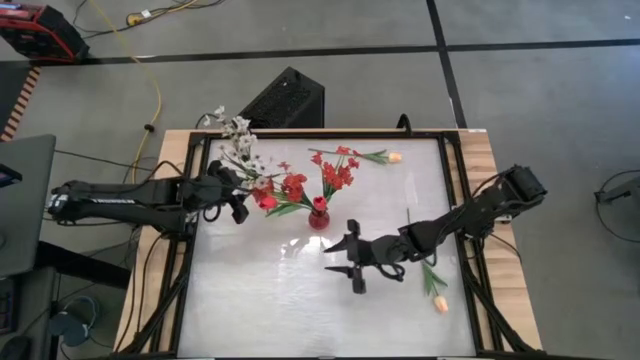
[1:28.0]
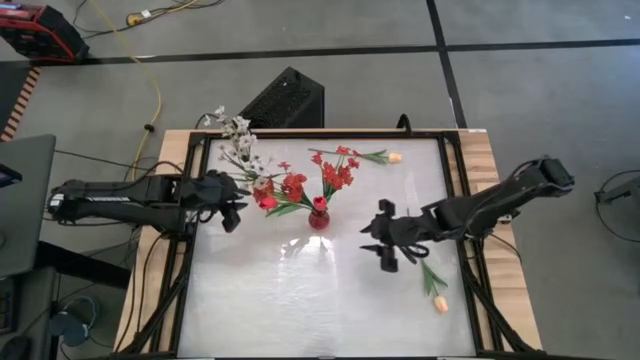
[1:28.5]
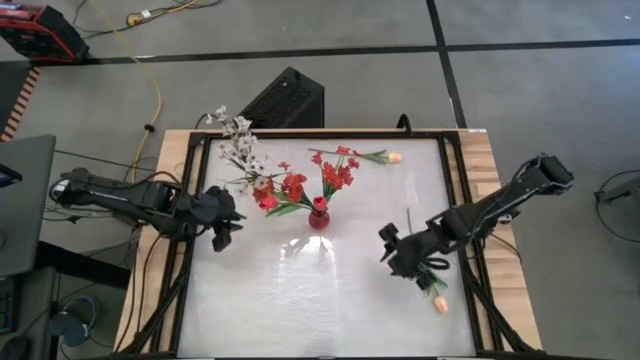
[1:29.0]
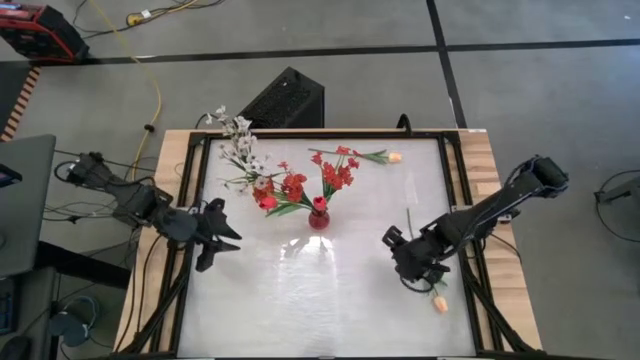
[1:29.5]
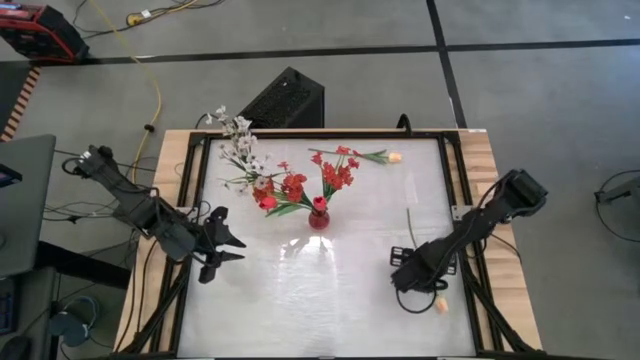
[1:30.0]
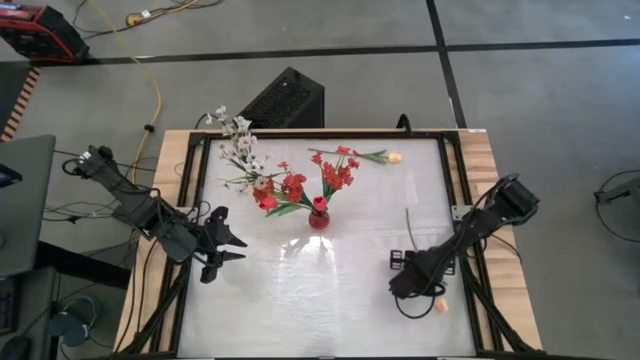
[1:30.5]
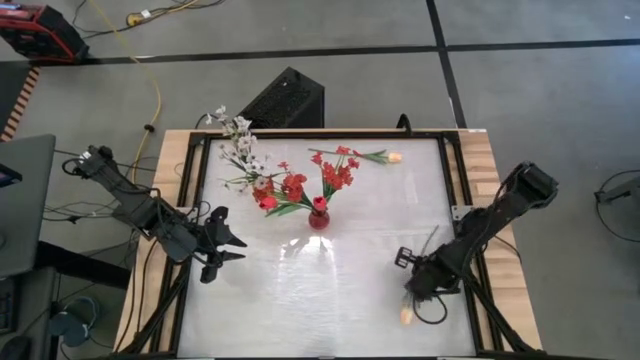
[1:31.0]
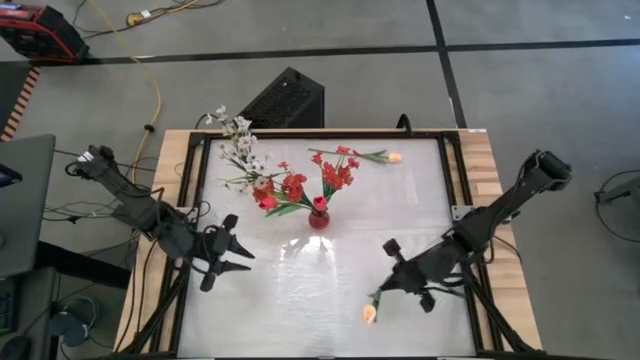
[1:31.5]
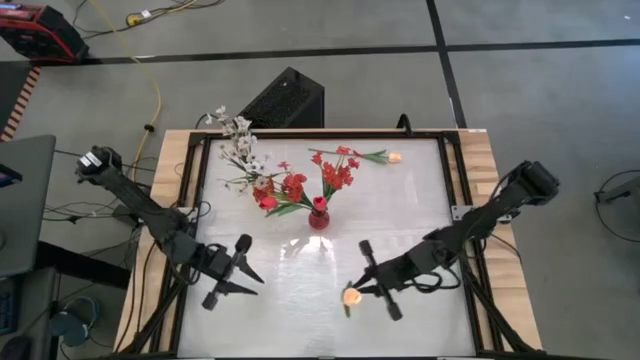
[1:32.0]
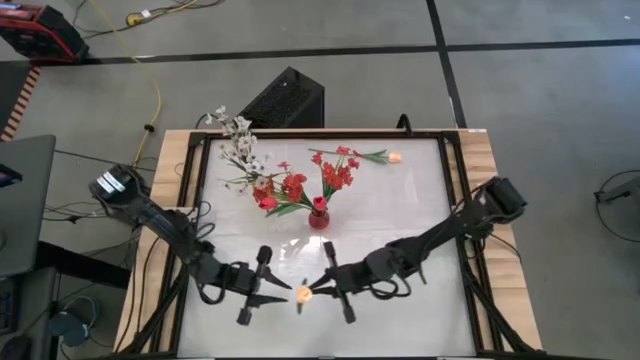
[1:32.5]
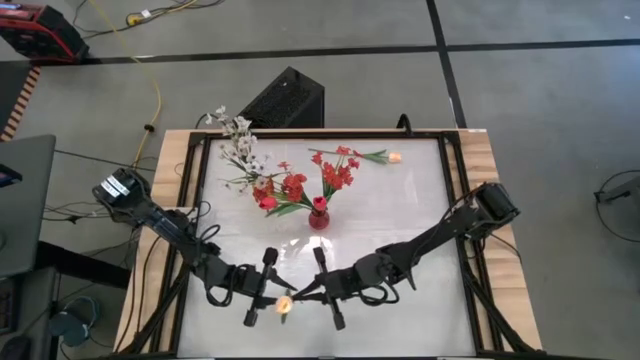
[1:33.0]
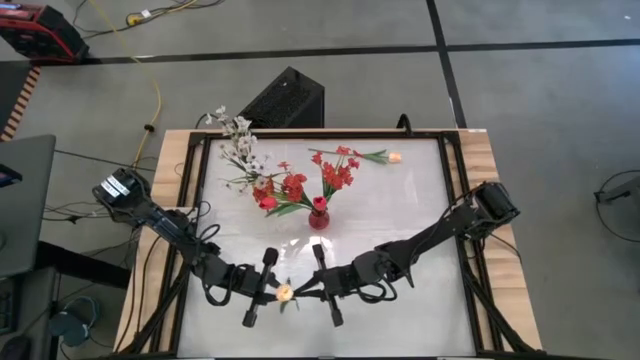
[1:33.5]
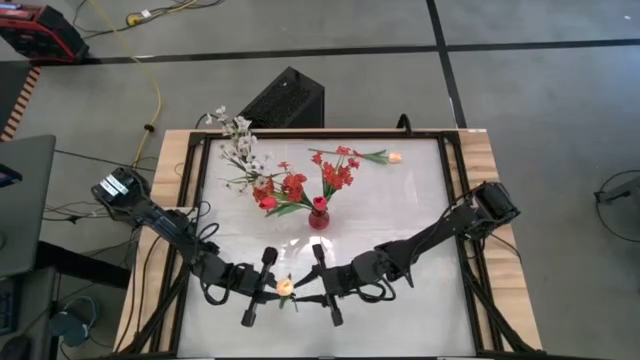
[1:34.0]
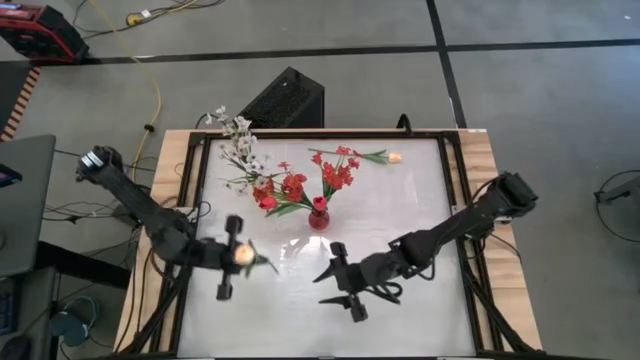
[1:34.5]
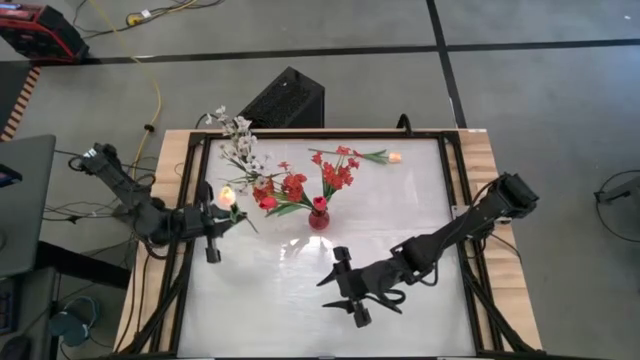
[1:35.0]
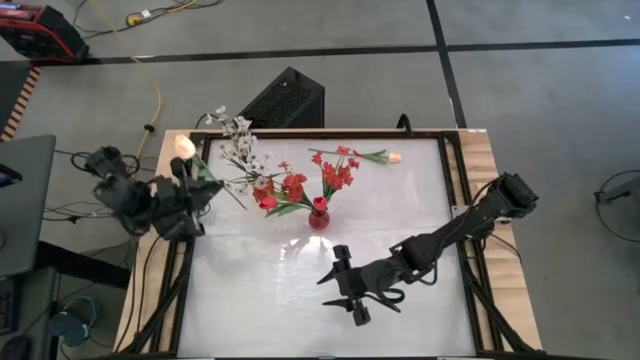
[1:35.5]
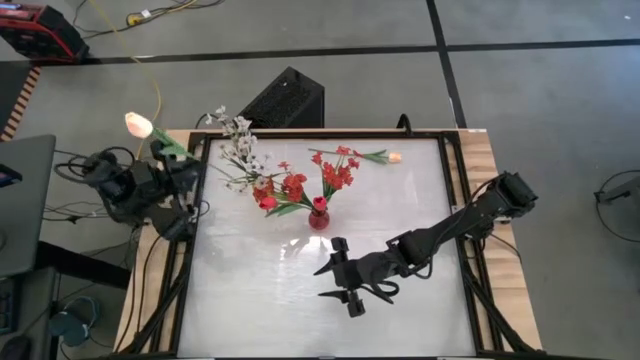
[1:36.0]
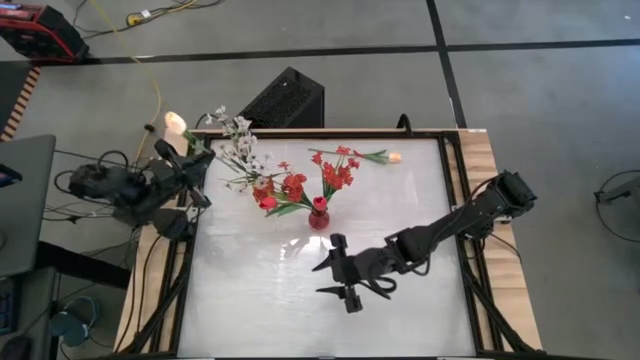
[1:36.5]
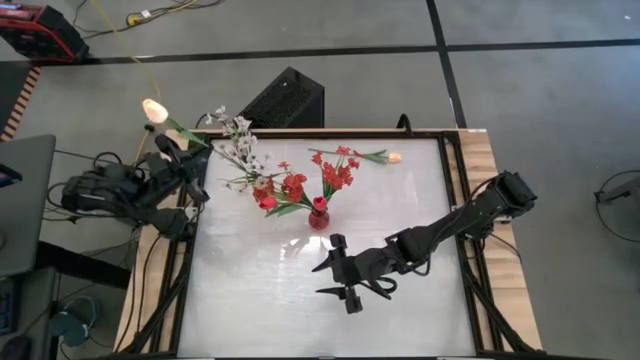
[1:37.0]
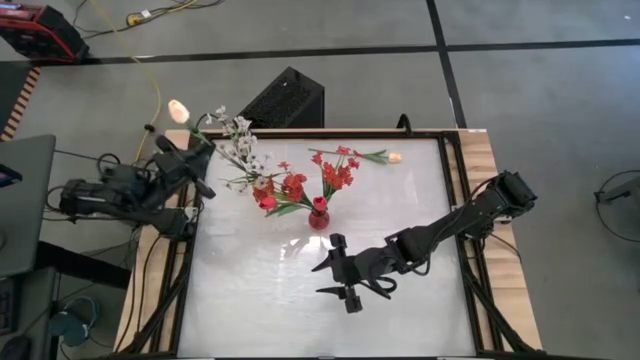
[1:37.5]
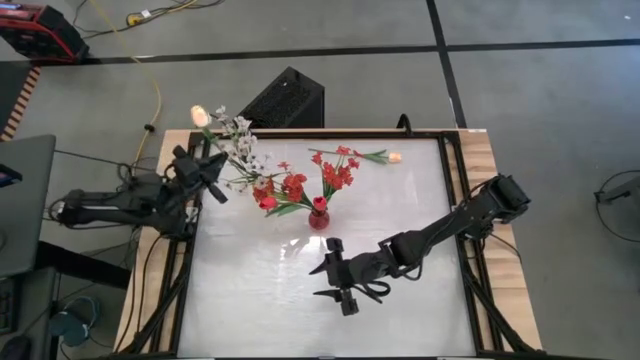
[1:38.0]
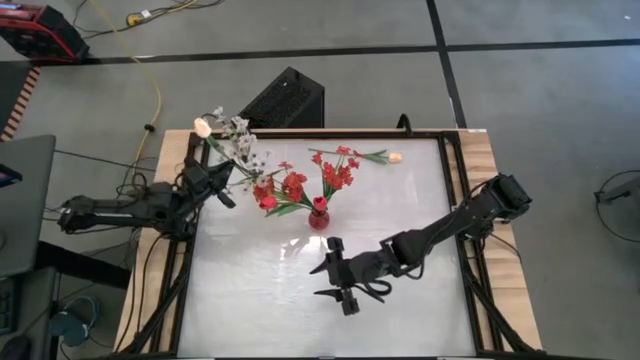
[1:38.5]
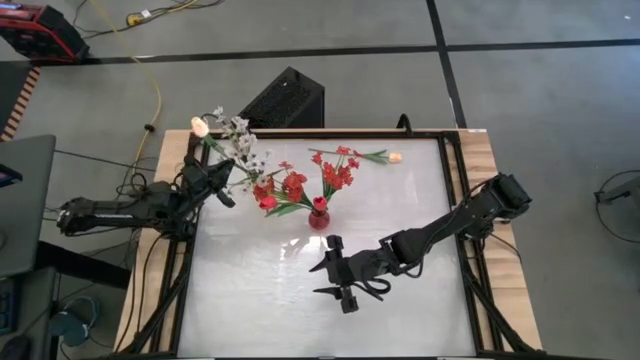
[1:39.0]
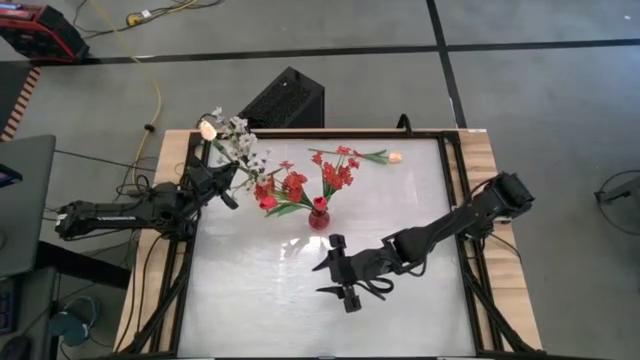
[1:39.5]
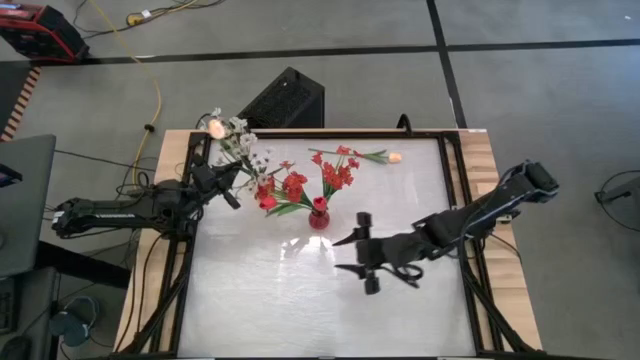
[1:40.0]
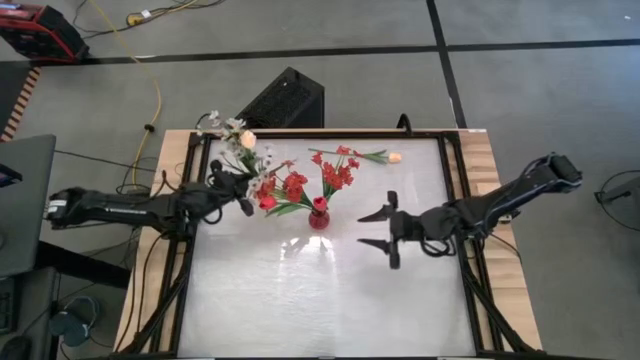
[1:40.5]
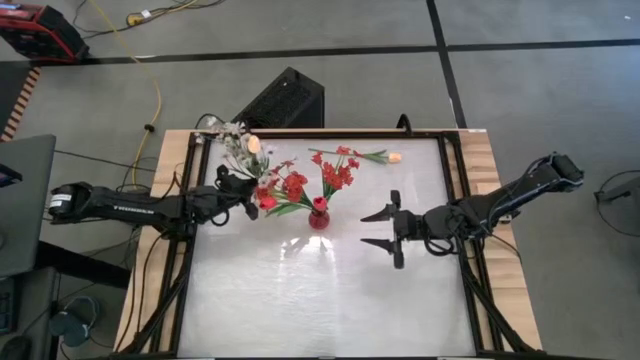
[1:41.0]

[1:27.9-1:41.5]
Task: Sort flowers into vase by color
Put the bottom white tulip into the yellow vase

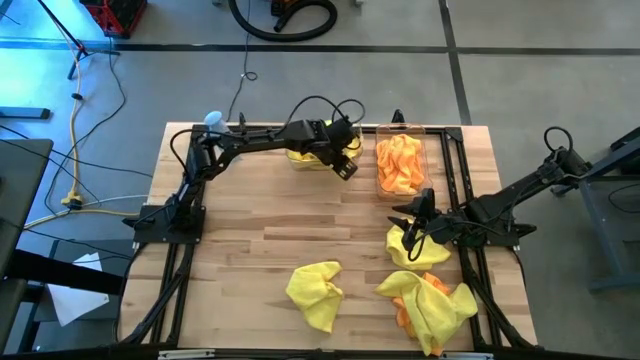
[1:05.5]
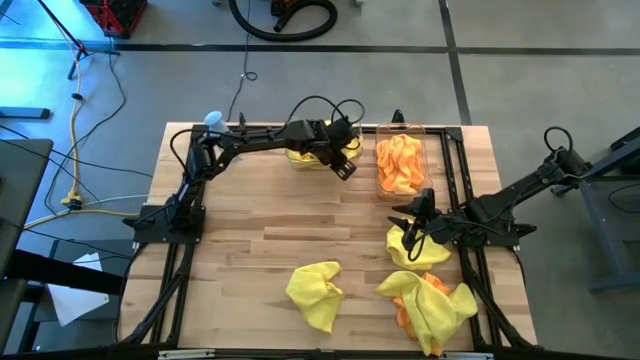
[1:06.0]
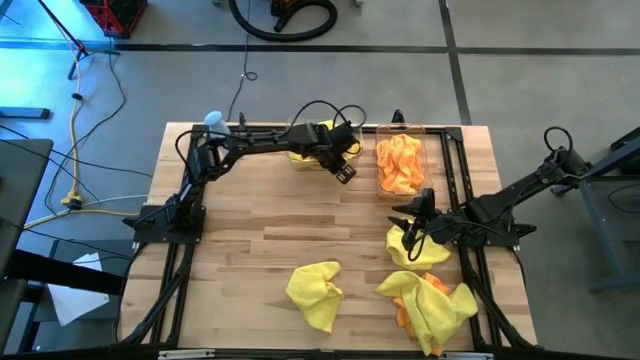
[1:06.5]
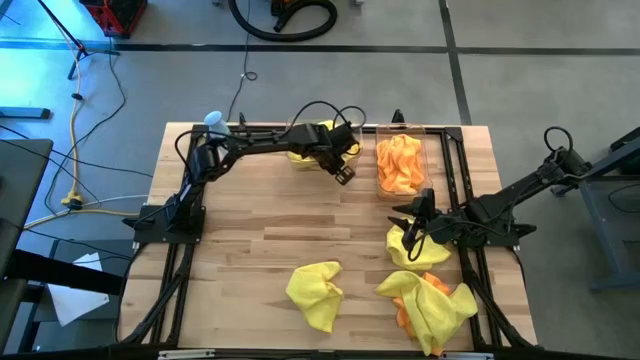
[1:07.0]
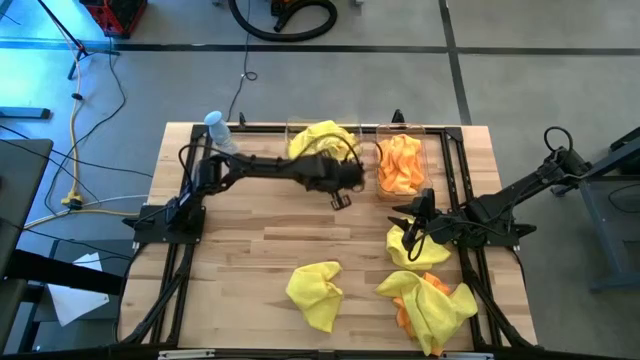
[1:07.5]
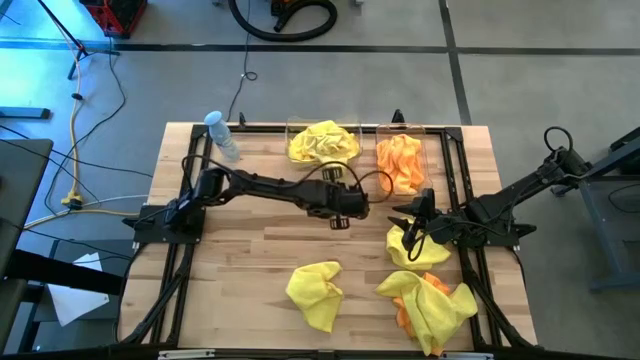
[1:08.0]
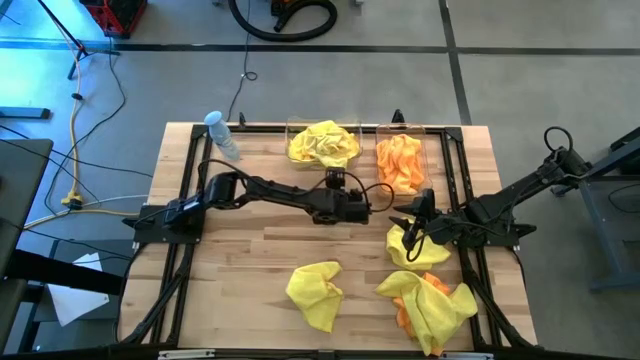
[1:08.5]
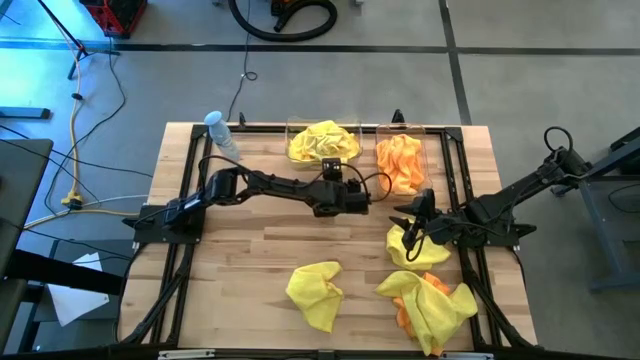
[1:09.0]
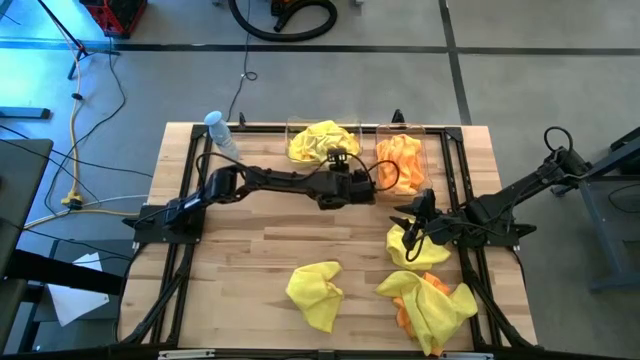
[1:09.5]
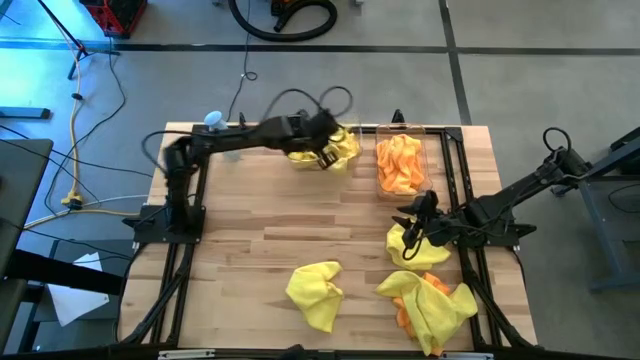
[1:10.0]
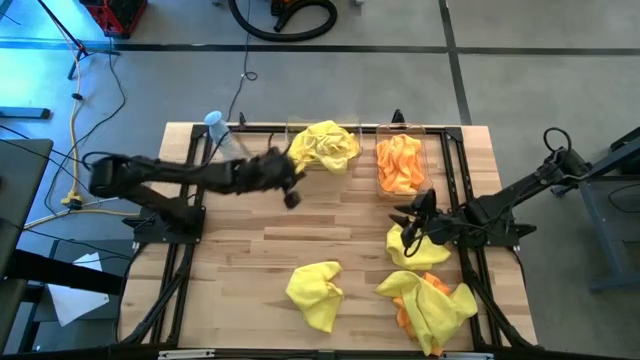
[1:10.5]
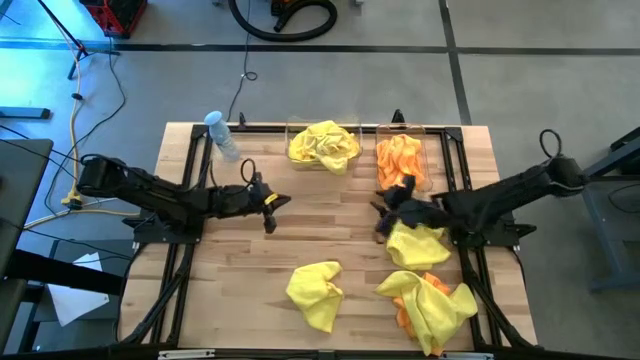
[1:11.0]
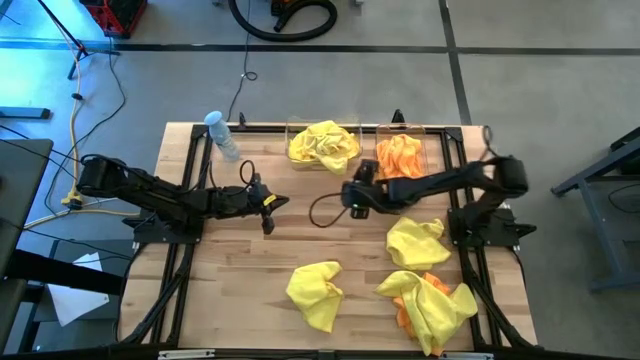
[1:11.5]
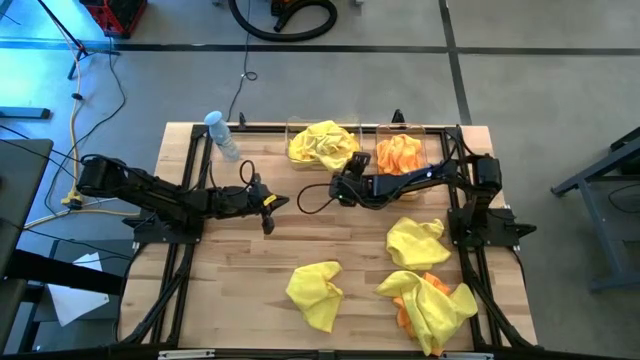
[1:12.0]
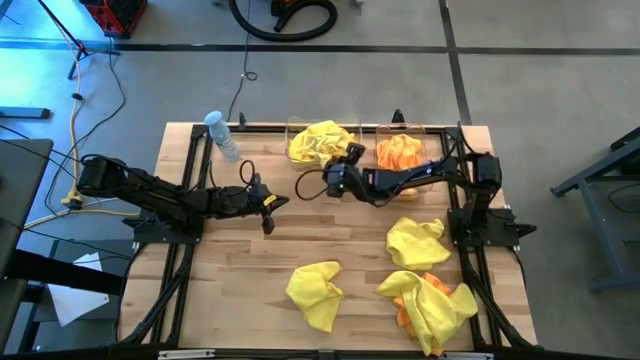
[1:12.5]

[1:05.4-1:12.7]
Task: Sort microfiber towel by color & place in baskets
Put the yellow microfiber towel into the left transparent bin
